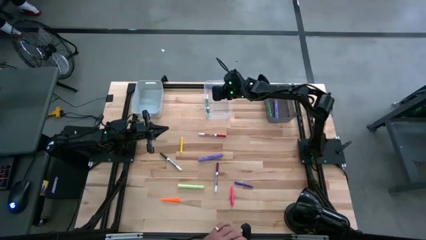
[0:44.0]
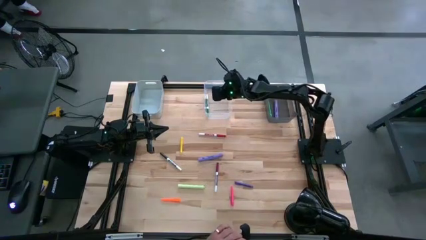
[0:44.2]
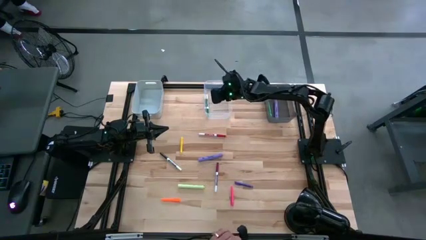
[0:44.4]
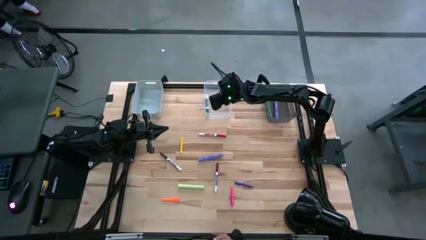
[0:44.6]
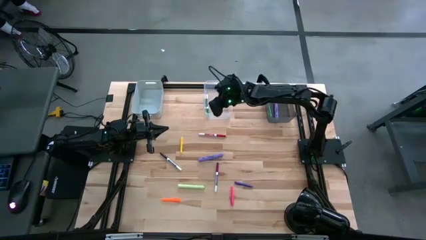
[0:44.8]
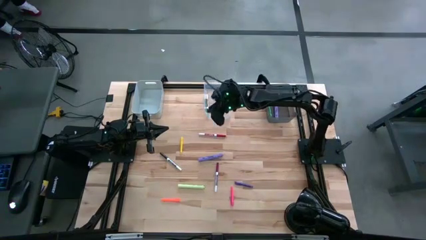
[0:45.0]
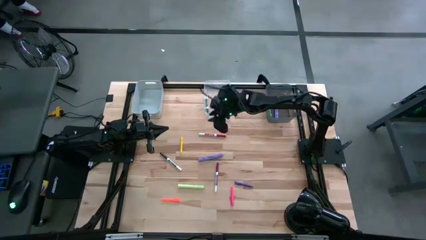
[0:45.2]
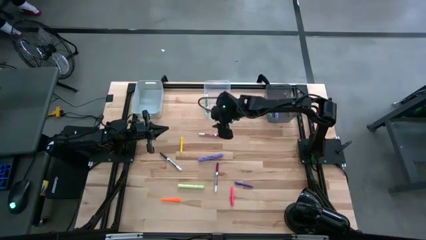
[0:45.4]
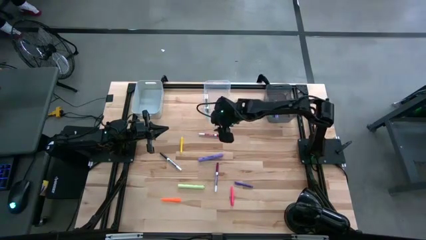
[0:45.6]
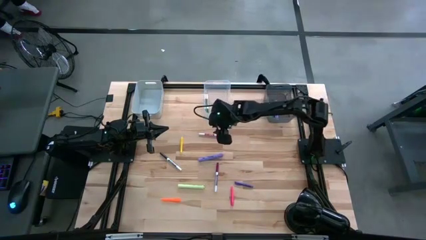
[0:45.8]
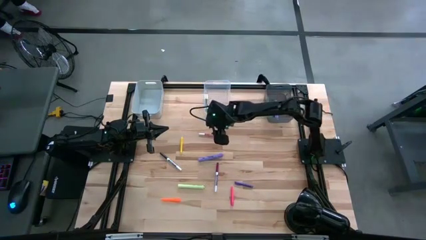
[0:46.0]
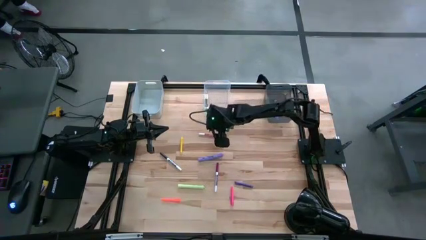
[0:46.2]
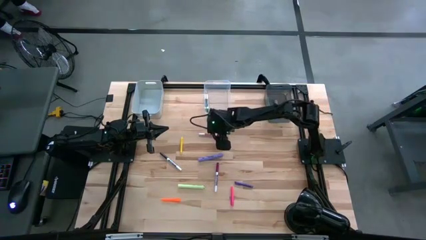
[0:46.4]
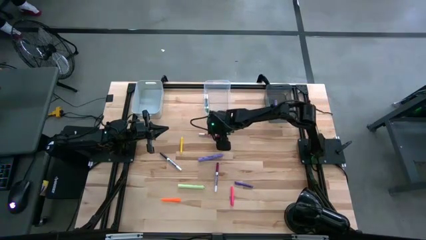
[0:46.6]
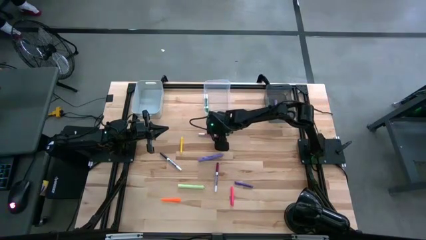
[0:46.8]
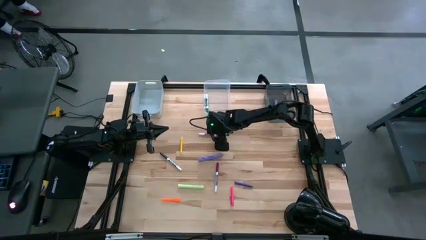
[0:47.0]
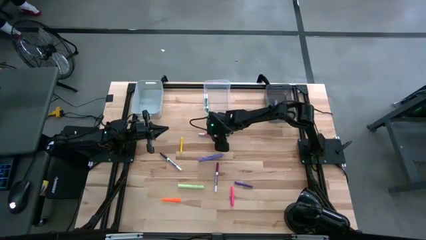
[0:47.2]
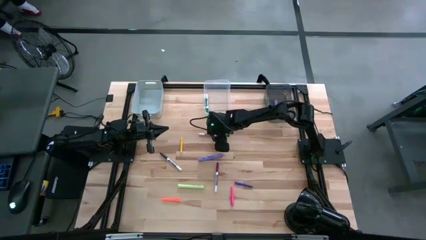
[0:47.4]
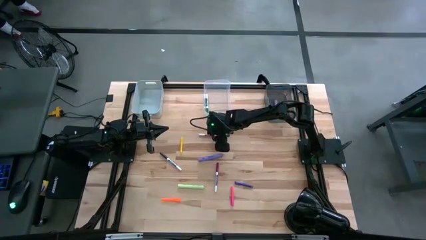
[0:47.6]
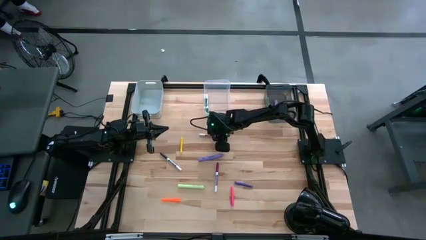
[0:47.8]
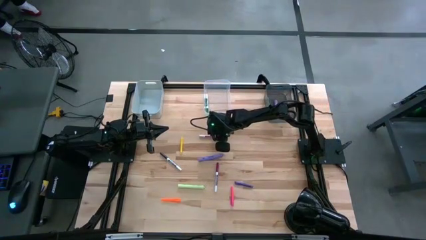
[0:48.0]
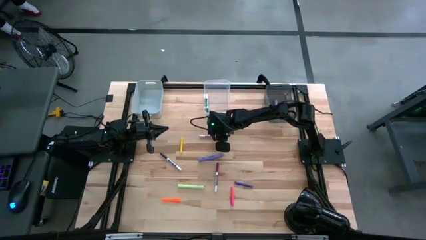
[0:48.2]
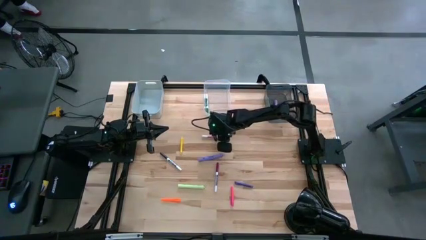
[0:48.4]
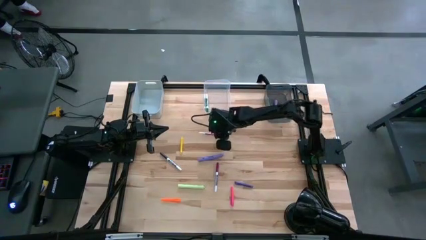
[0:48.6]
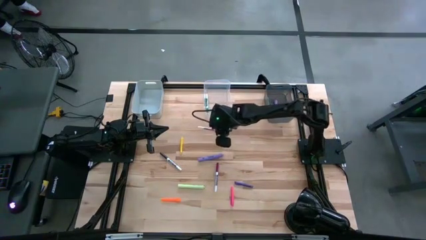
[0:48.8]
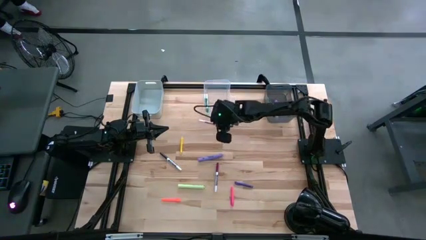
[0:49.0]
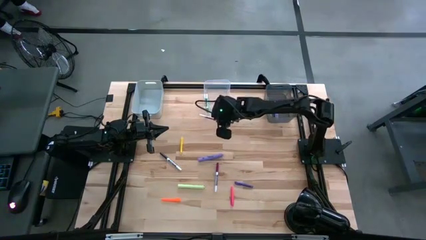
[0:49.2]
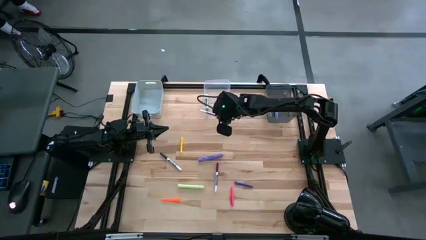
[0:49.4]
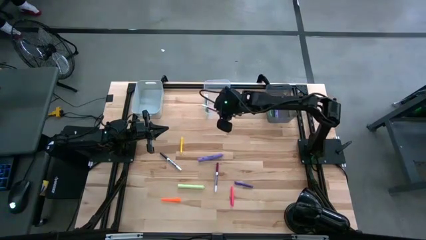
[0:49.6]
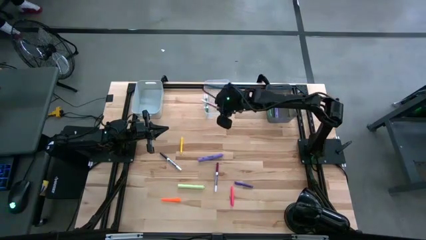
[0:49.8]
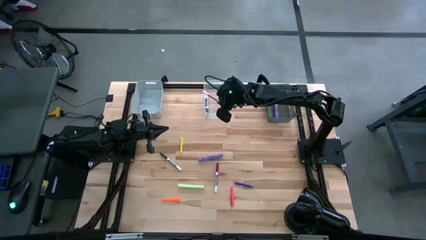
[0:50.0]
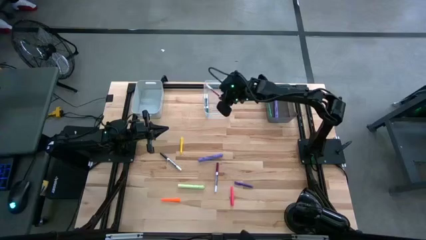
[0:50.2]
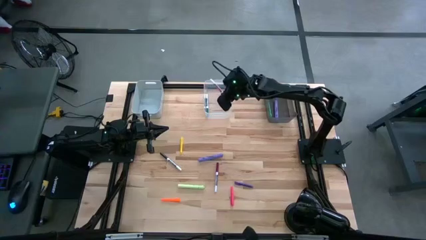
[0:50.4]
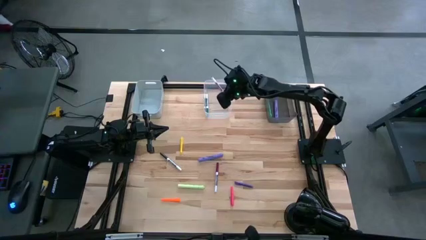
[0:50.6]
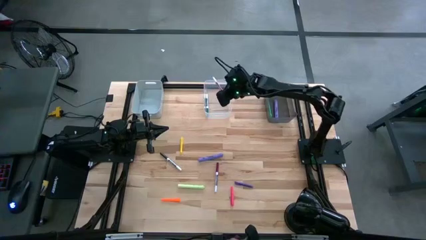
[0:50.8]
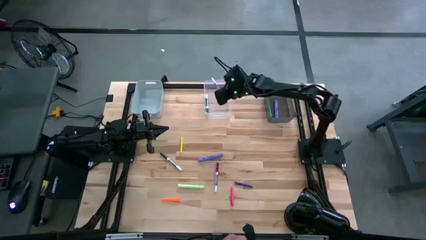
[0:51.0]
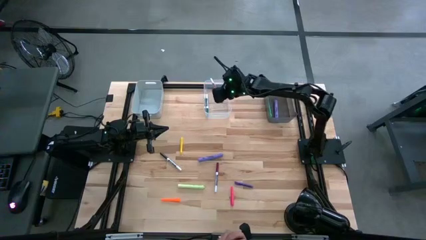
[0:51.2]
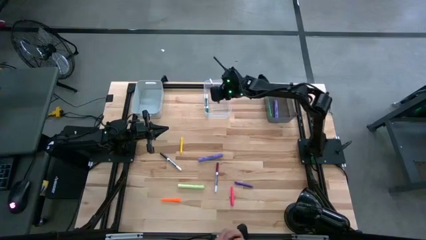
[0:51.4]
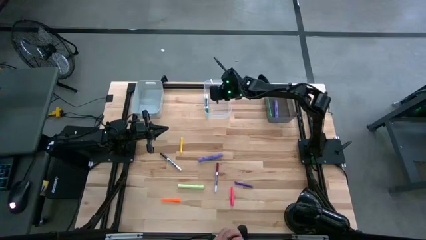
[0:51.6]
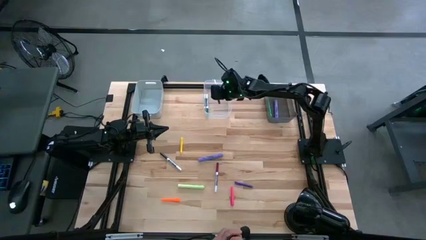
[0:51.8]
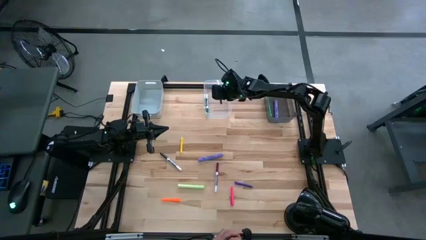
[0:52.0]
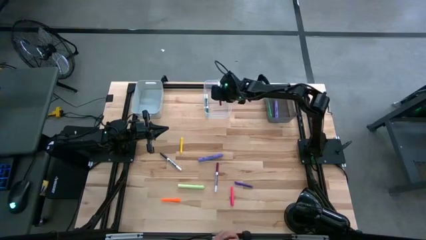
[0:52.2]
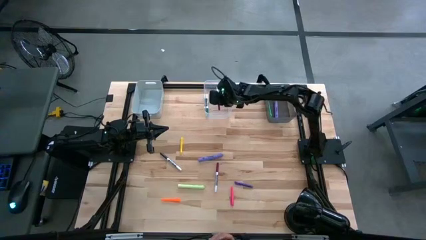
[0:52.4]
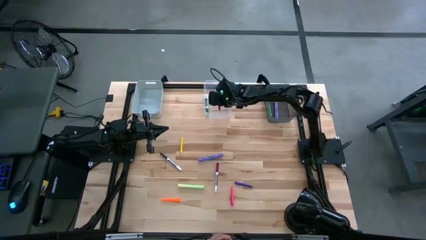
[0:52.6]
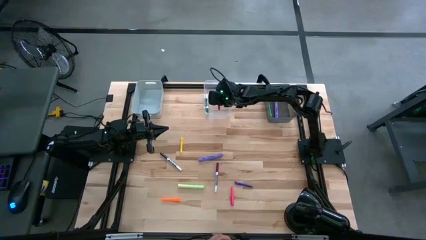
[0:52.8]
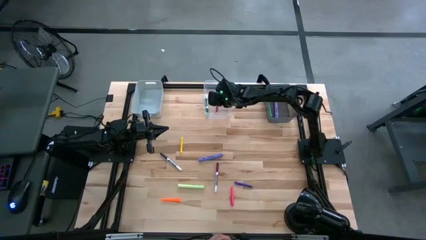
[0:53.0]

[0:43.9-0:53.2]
Task: Pick & Place Markers
Put the red marker pen into the transparent bin

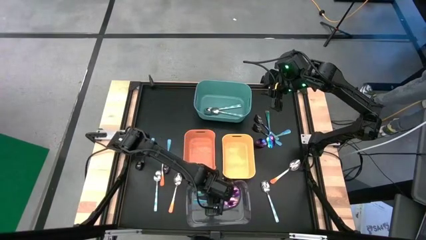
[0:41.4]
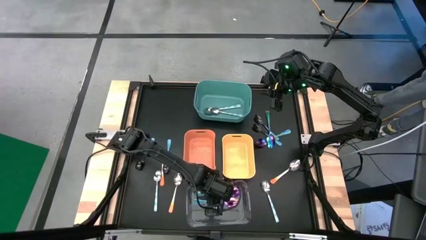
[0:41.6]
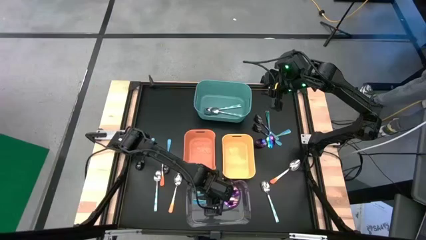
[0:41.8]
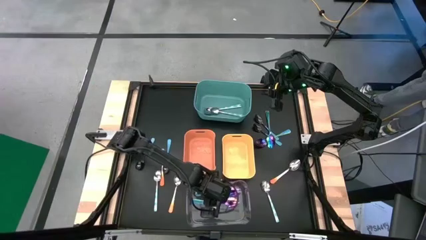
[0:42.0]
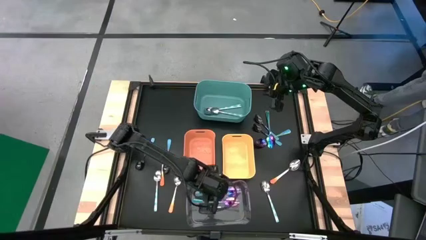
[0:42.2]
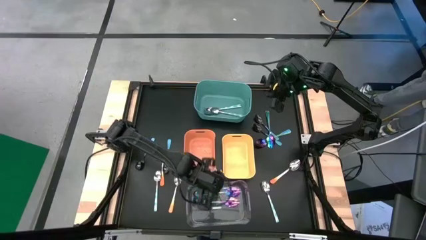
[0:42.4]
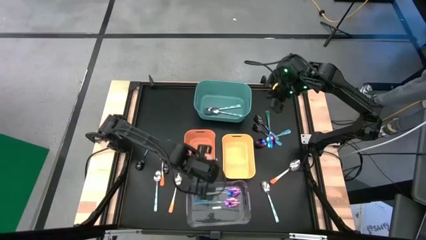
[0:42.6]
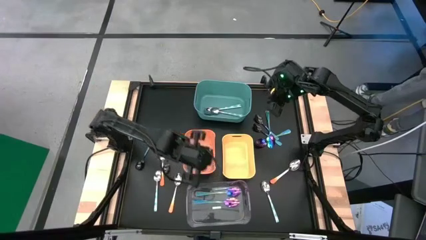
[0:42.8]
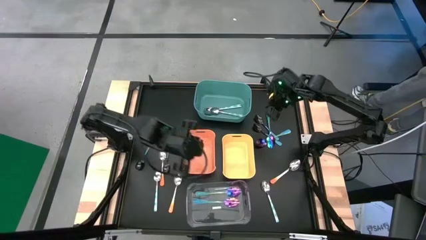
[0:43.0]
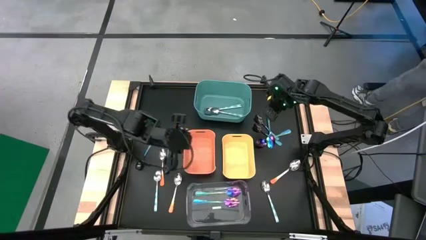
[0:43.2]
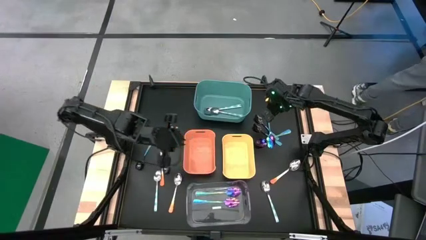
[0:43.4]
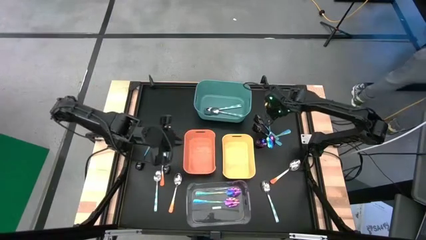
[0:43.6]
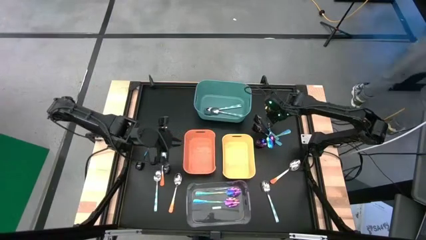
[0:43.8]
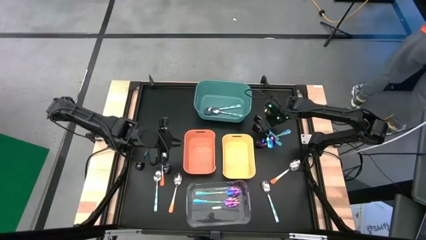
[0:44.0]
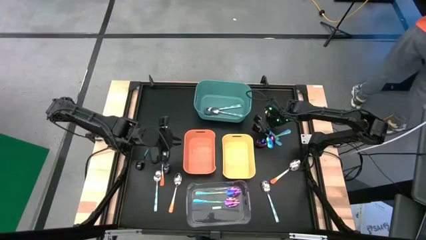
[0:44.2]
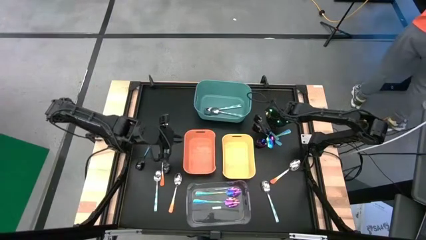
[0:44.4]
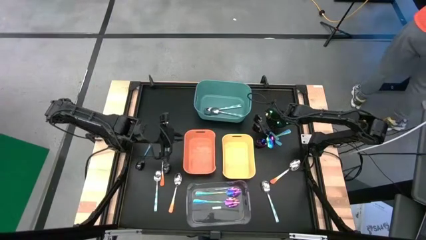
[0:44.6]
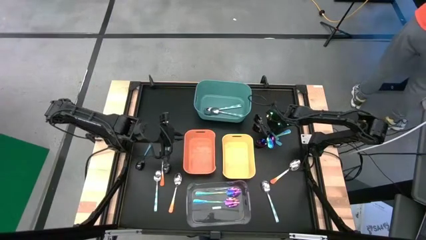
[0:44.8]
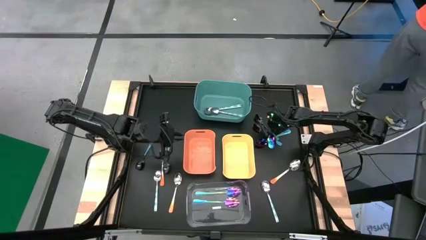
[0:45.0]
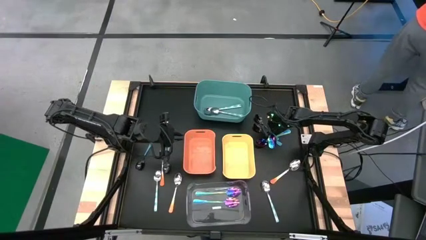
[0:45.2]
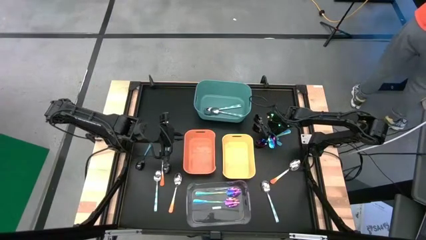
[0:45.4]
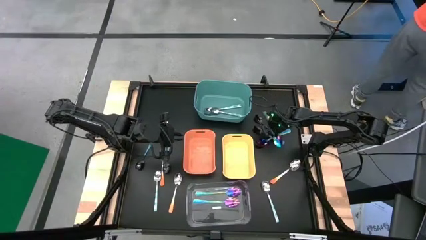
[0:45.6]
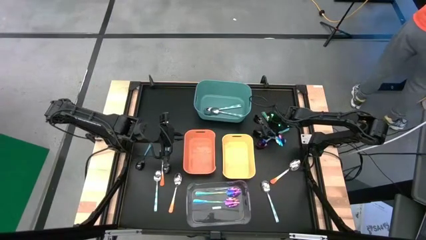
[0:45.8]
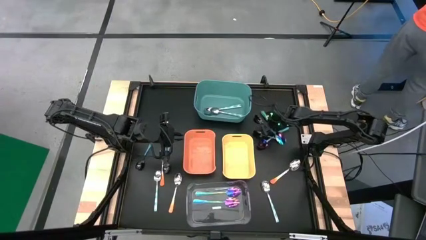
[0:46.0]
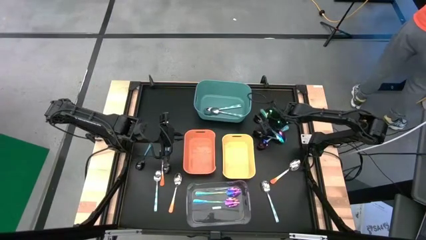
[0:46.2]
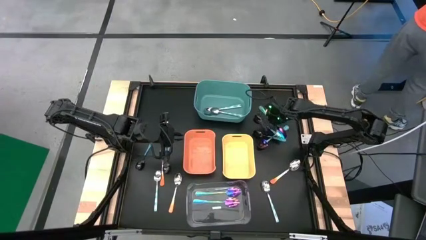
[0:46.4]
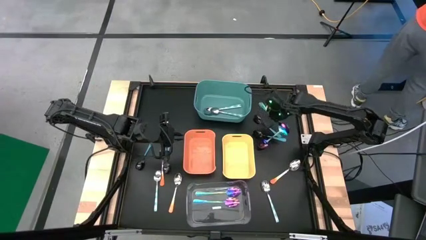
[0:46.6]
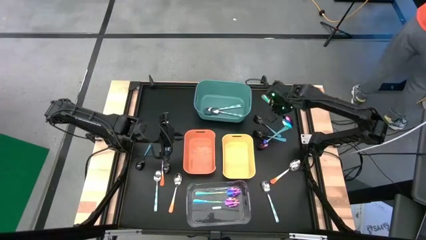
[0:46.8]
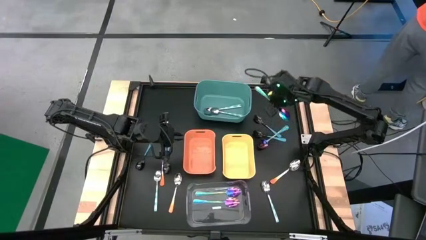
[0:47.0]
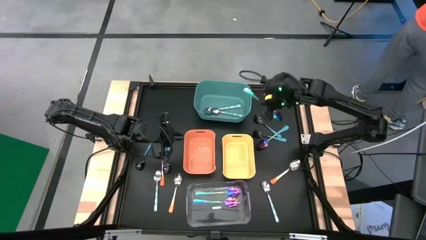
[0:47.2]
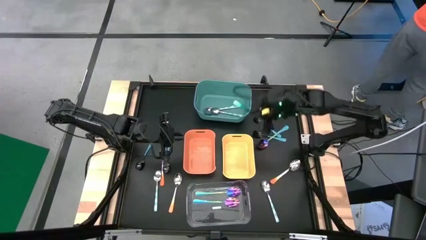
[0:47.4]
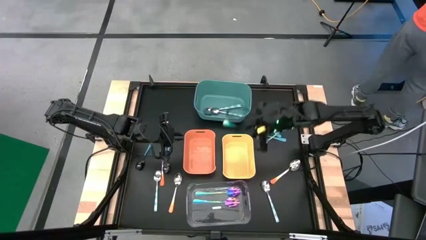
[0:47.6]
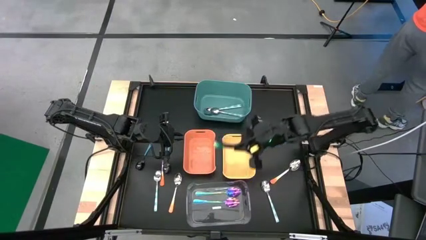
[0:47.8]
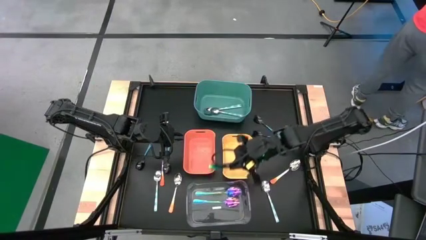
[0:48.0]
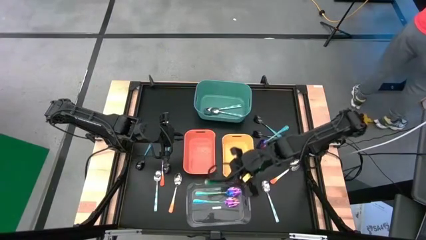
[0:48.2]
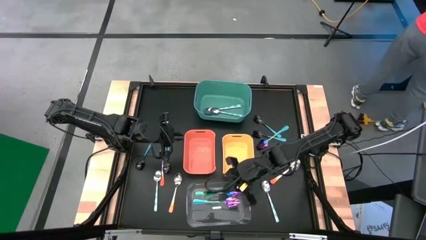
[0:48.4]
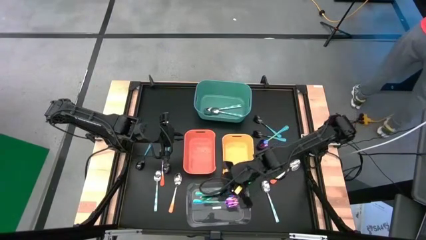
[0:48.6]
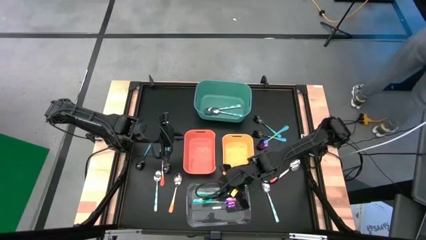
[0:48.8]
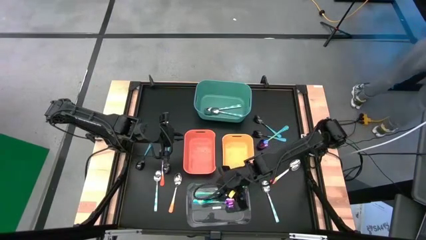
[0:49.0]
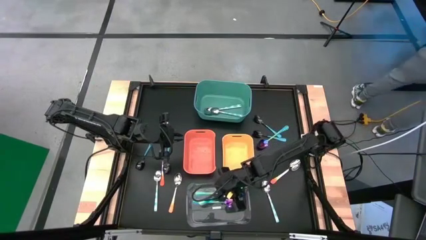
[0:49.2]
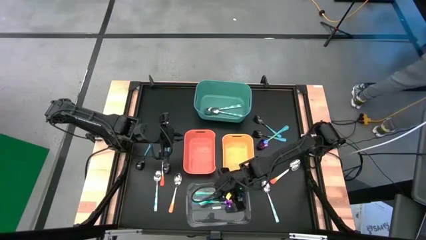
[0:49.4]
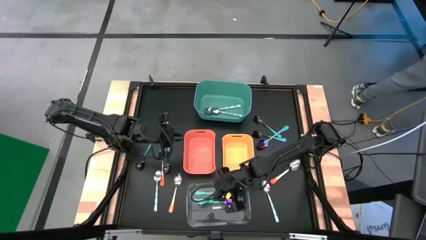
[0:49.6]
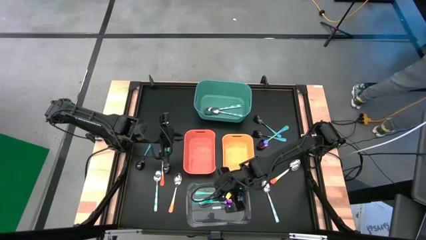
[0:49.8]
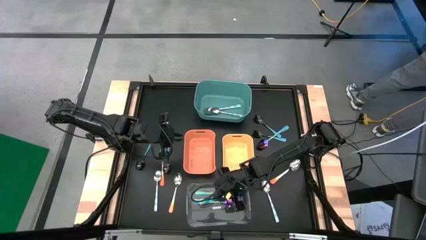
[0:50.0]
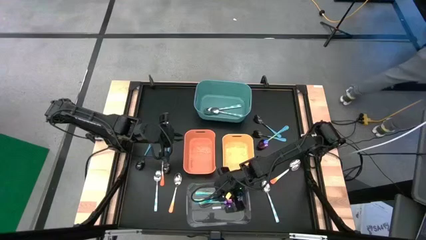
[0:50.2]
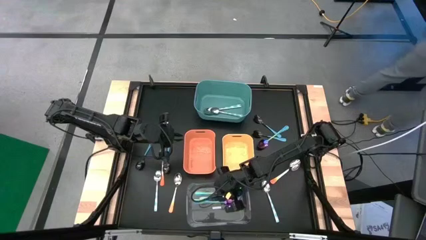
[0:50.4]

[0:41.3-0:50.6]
Task: Sort silverware by color (type)
Put the blue spoon into the transparent bin
